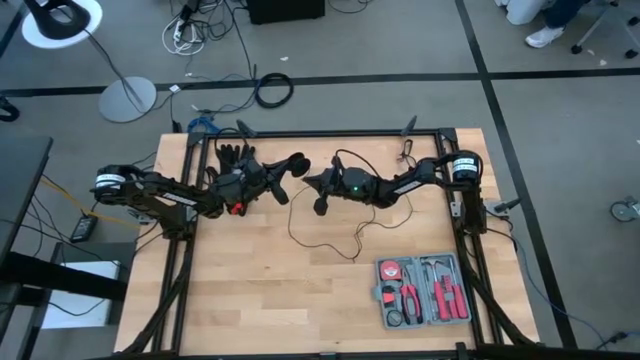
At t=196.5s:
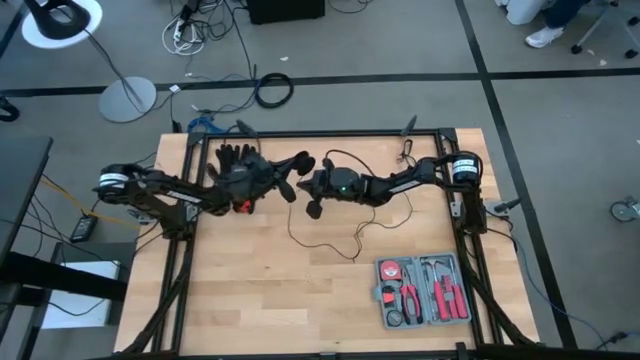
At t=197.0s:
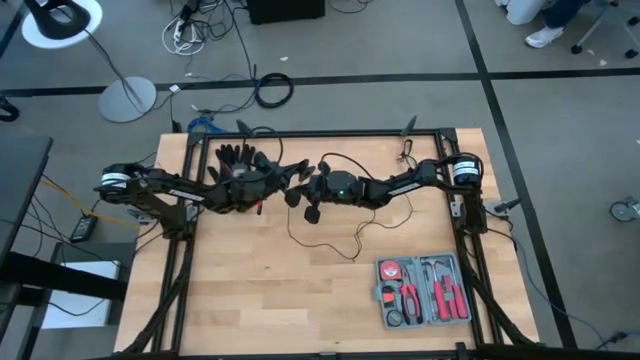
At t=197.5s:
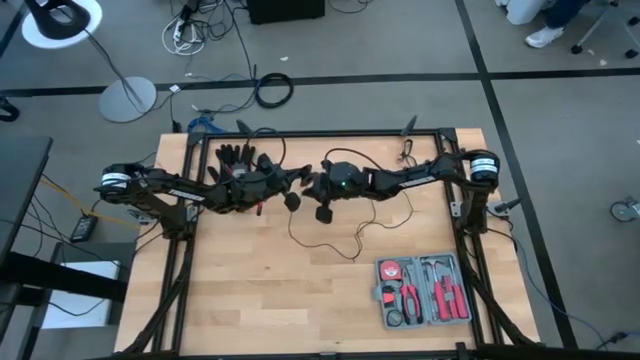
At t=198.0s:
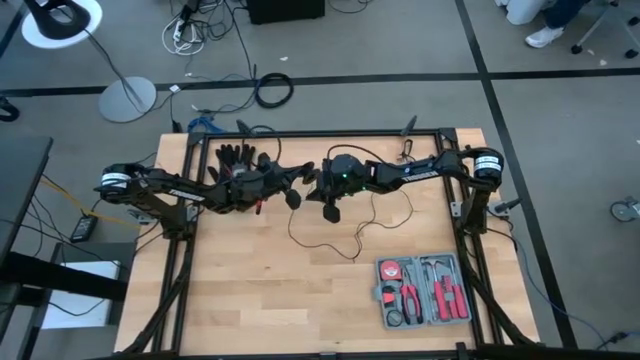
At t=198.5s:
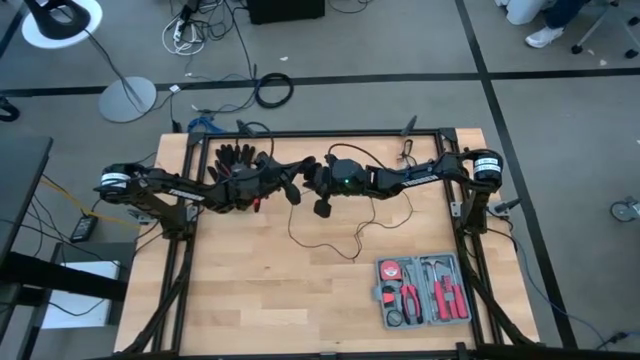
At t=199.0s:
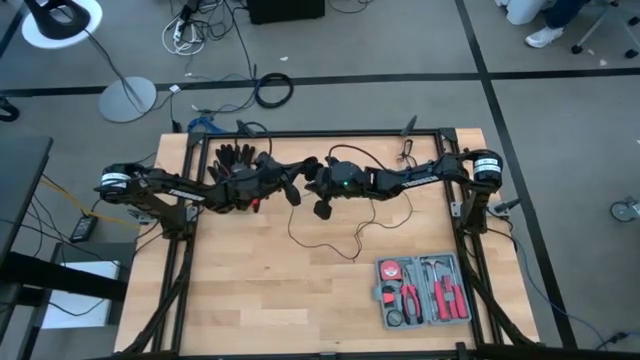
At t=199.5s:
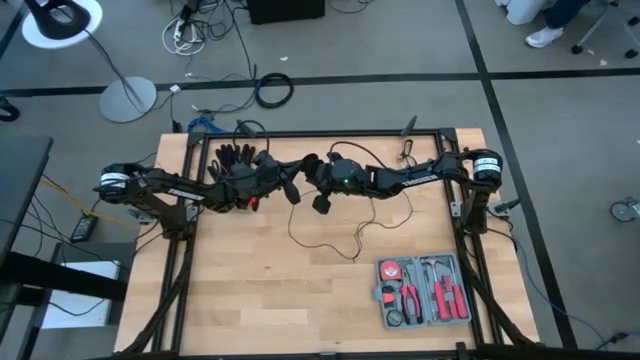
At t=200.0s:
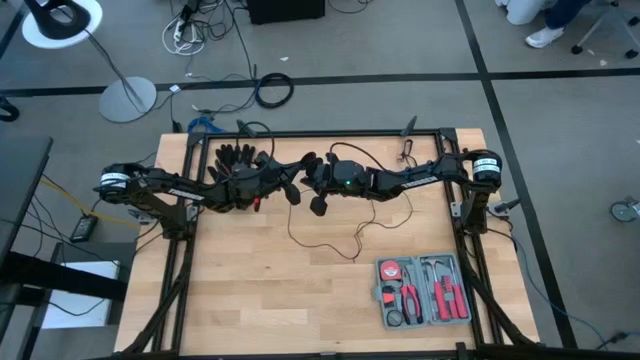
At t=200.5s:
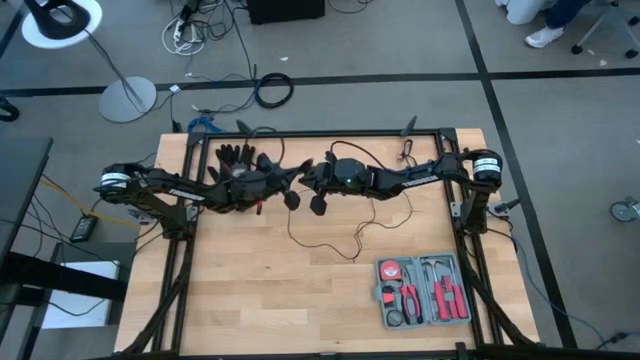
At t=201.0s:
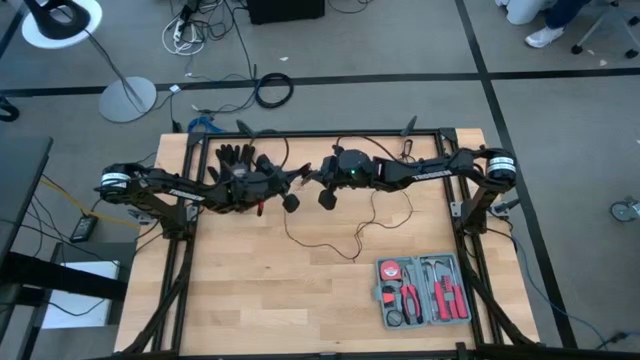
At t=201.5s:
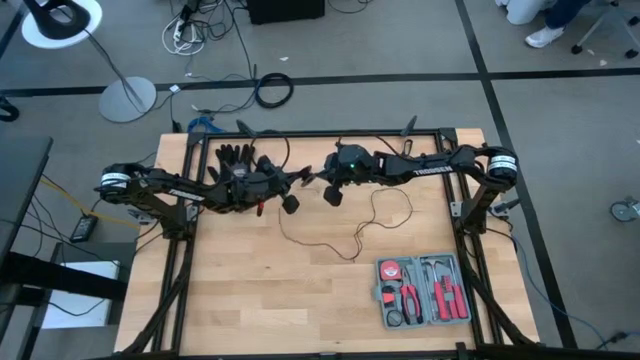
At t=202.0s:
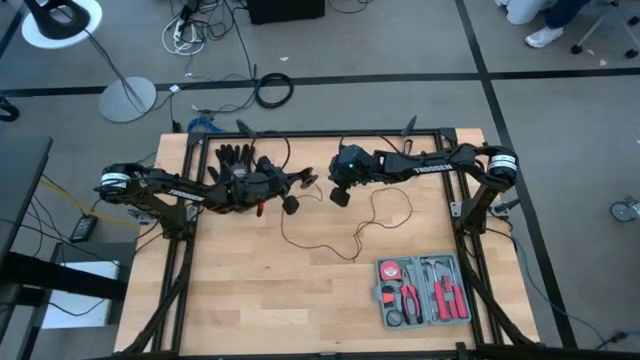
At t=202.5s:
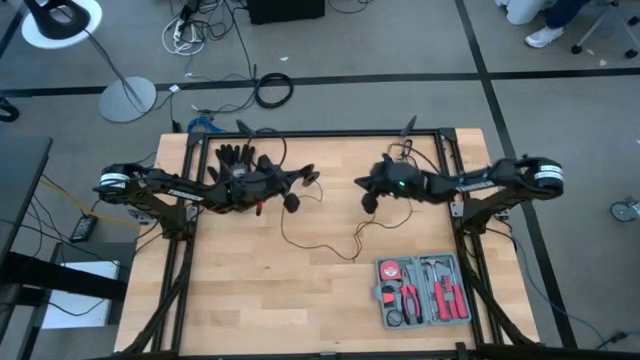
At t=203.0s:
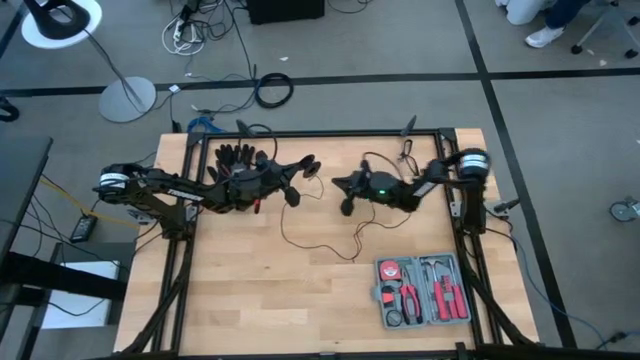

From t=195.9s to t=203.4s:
Task: Coil cords
Coil the black wire

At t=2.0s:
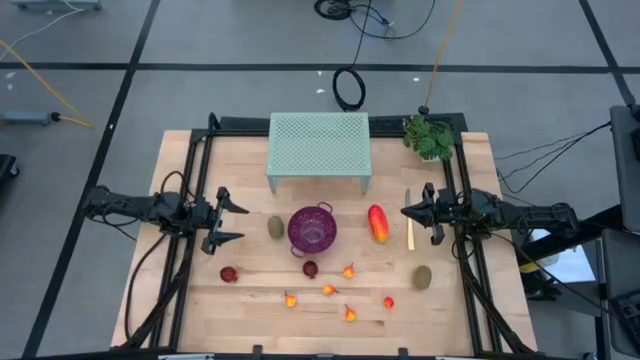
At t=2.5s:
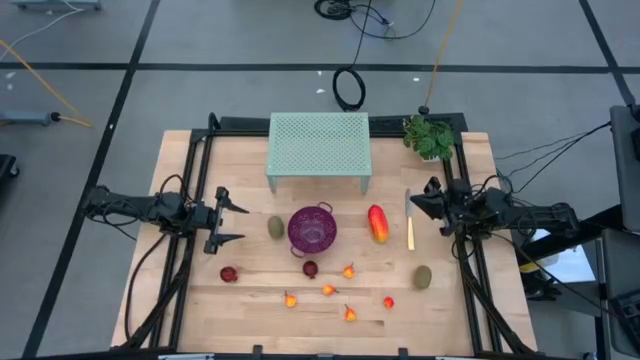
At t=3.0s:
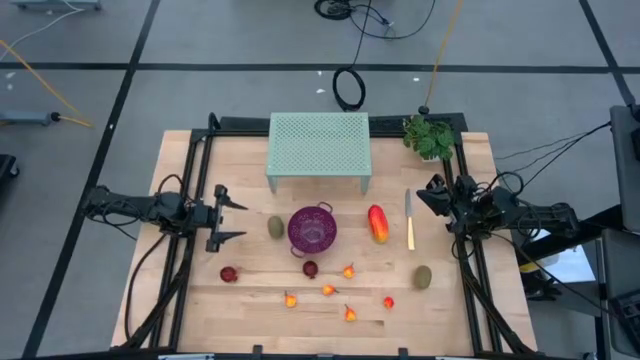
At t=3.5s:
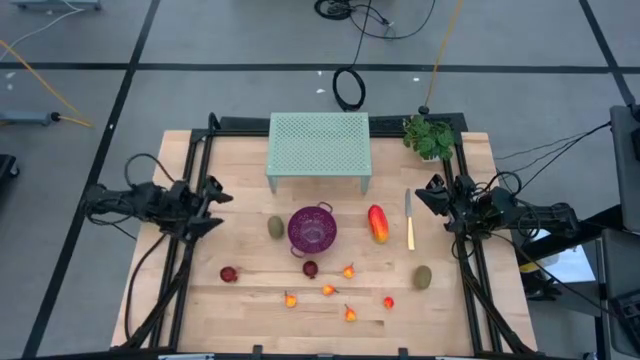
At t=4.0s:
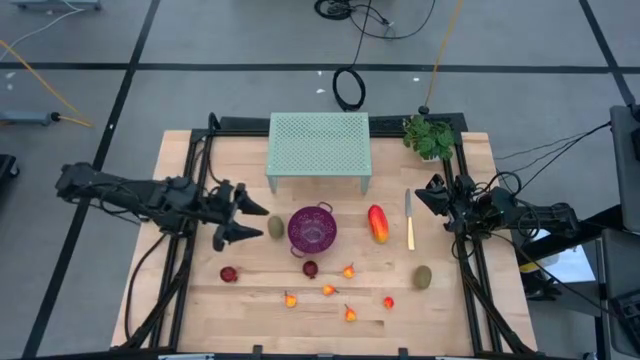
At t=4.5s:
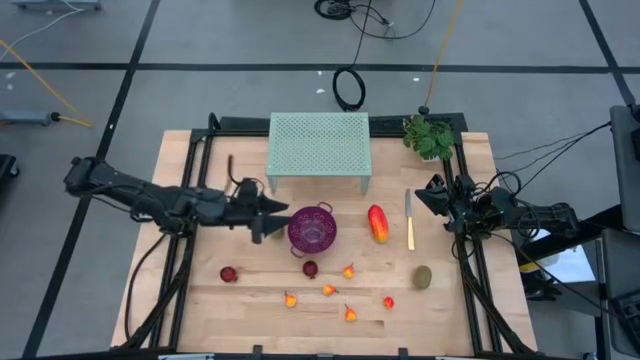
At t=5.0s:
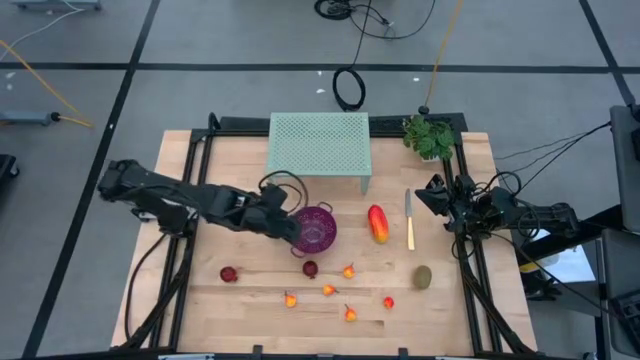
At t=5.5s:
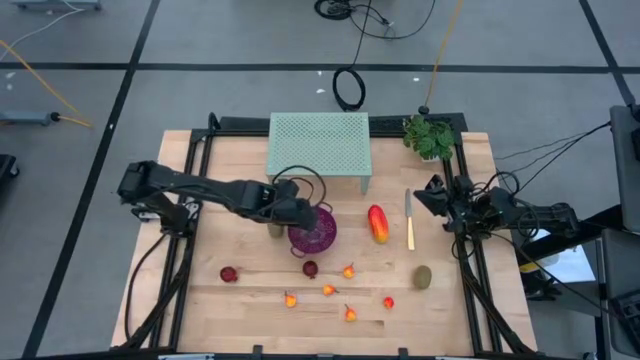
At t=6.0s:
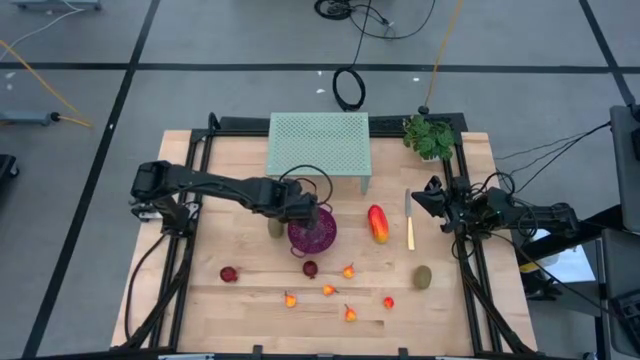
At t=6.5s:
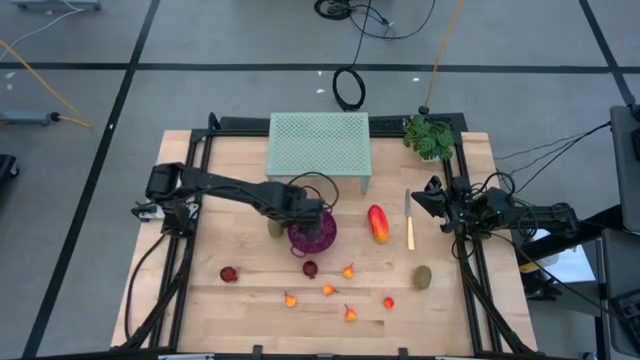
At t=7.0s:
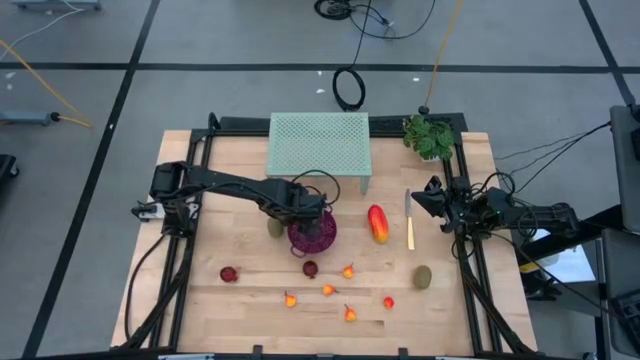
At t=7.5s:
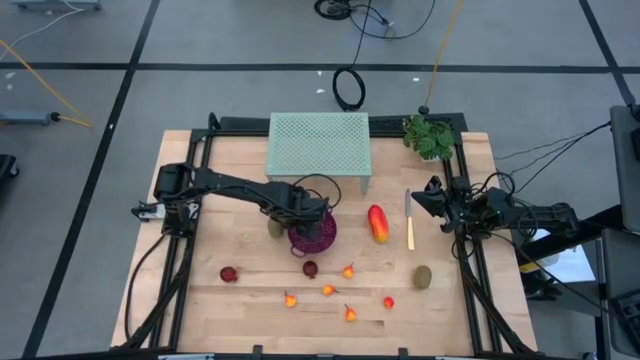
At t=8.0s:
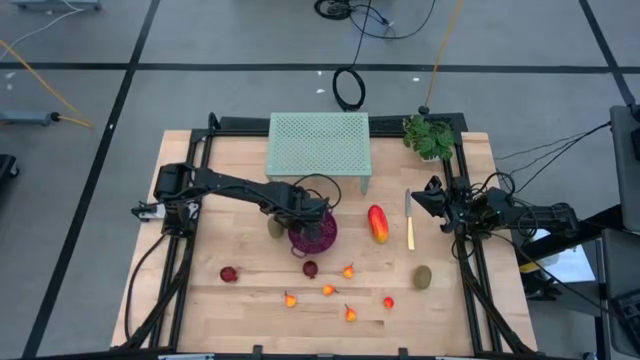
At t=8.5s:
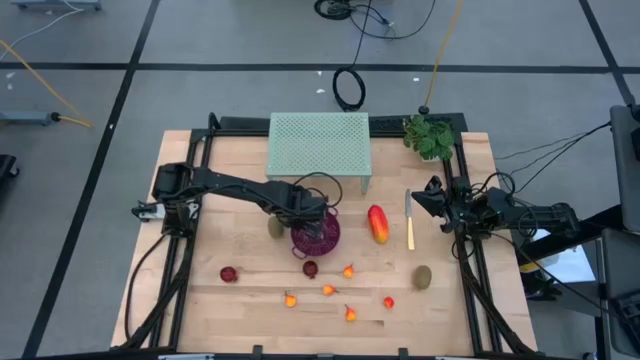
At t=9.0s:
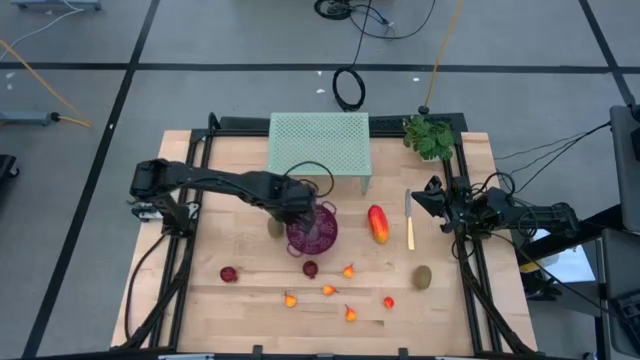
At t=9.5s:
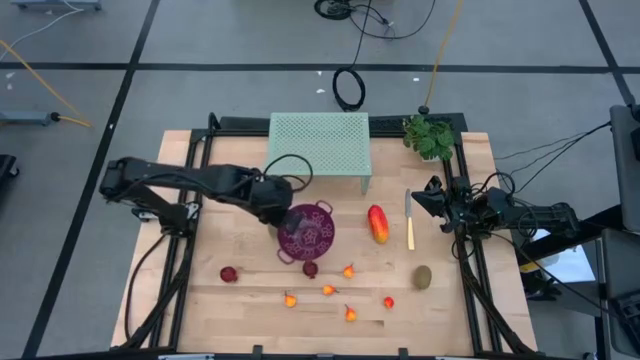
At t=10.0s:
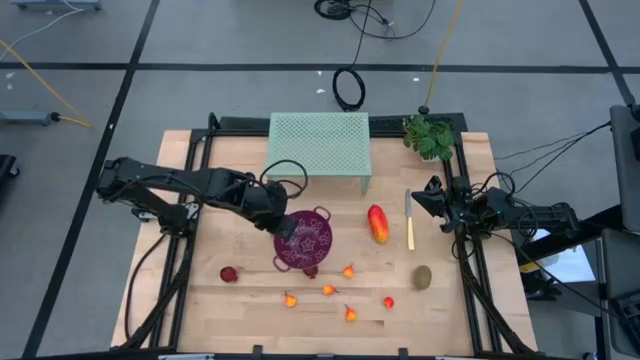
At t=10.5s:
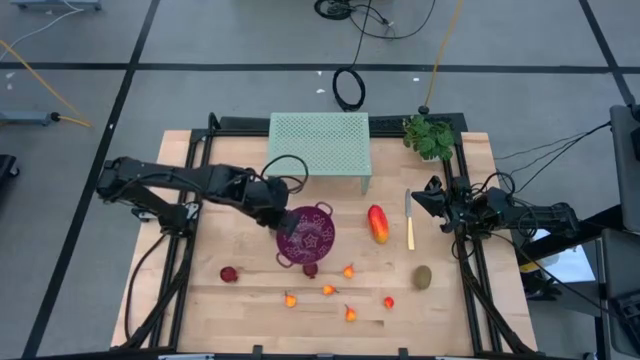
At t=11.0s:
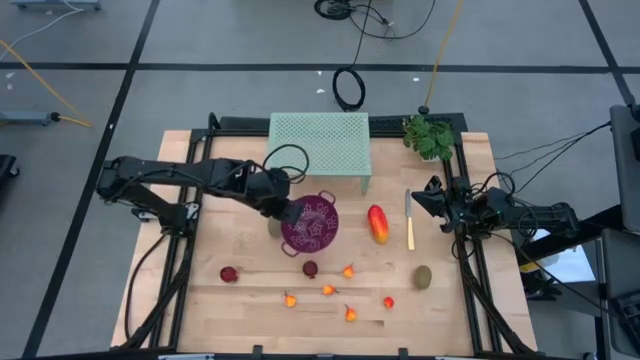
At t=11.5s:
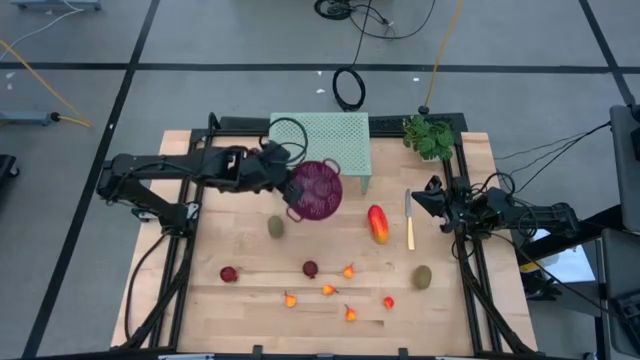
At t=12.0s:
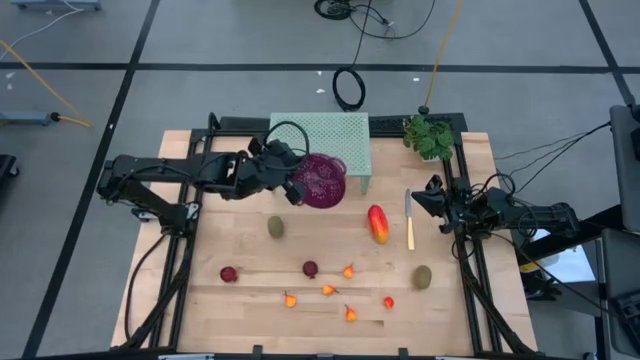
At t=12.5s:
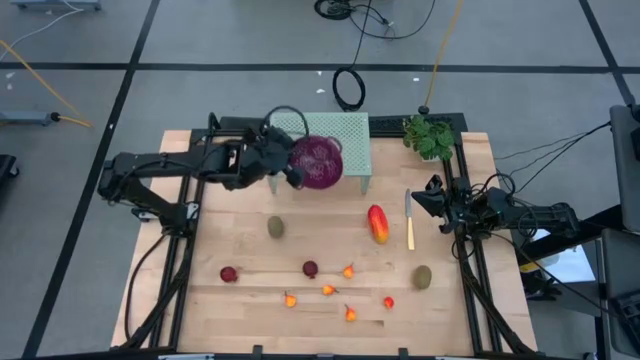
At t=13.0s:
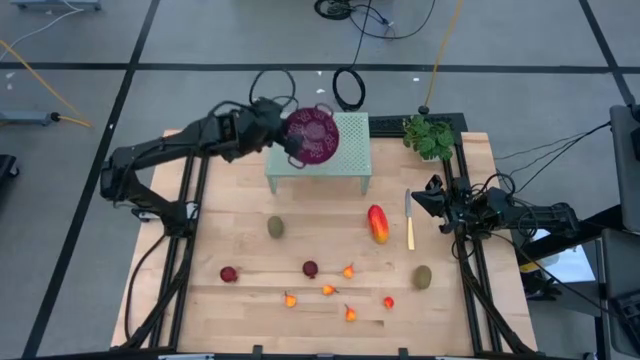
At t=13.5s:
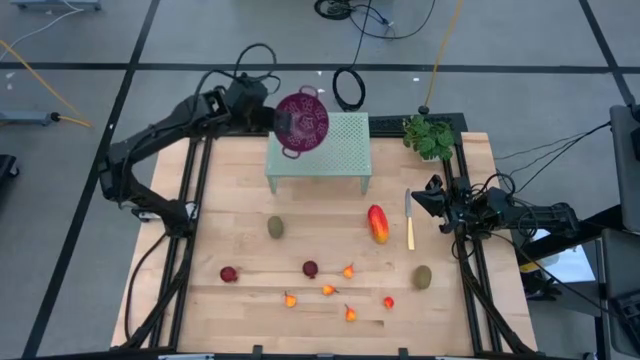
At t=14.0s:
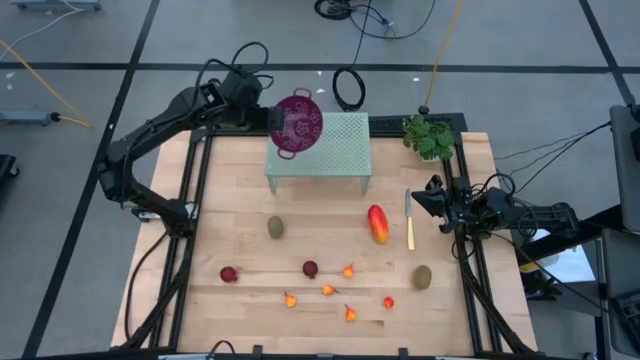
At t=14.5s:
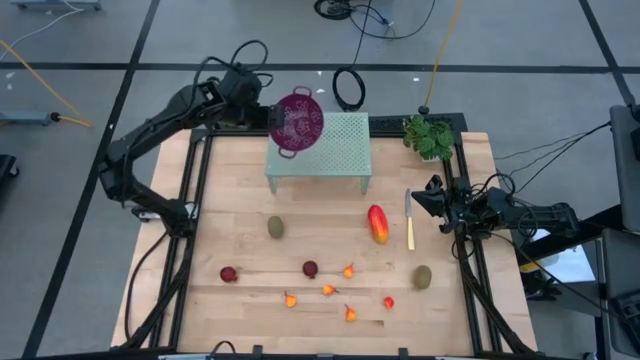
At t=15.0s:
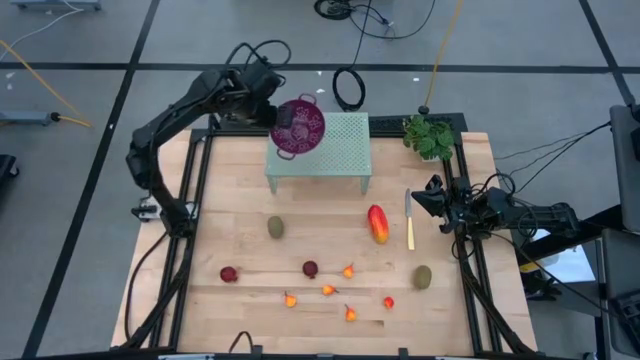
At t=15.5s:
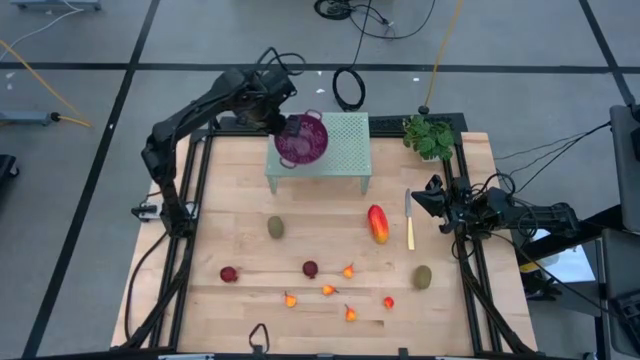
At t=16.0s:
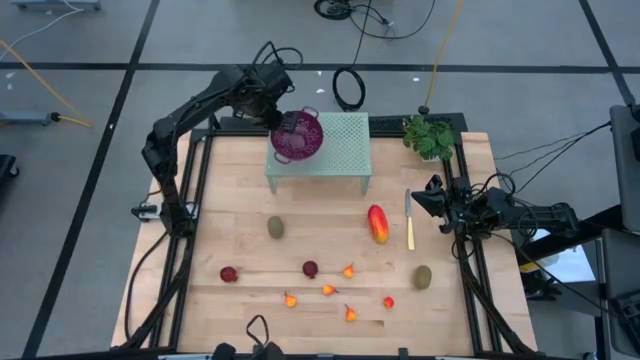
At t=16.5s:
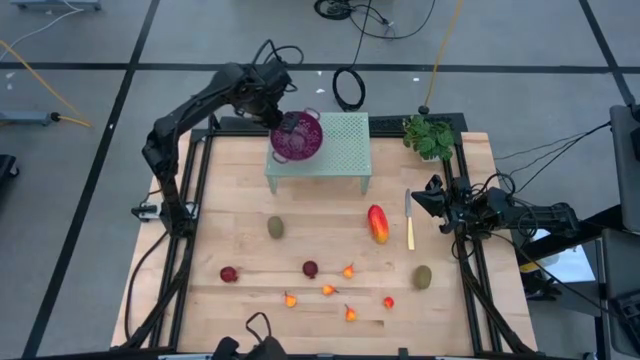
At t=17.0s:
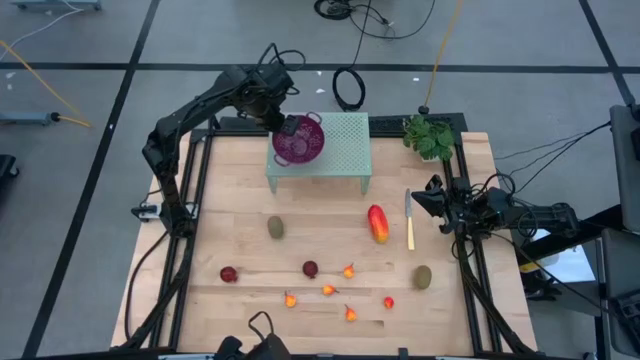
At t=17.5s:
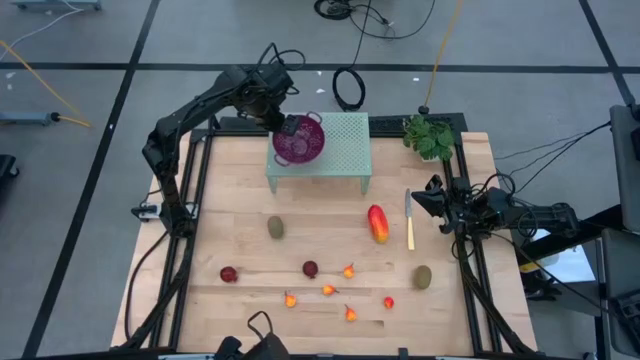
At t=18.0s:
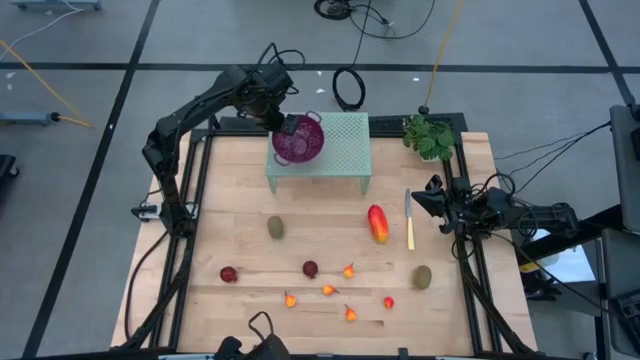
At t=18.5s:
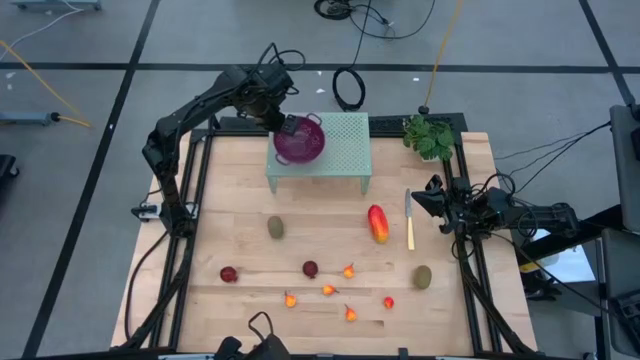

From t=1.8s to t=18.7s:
Task: Pick & Place Fruit
Put the violet strainer bowl on the shelf
